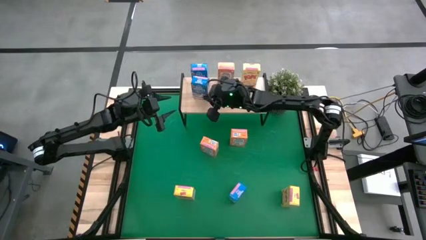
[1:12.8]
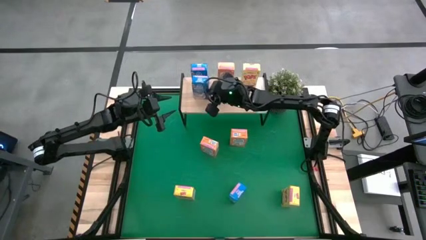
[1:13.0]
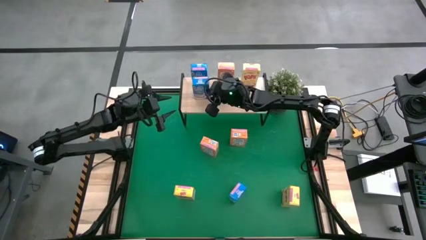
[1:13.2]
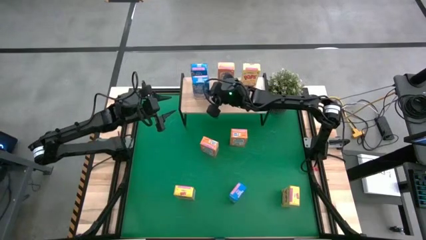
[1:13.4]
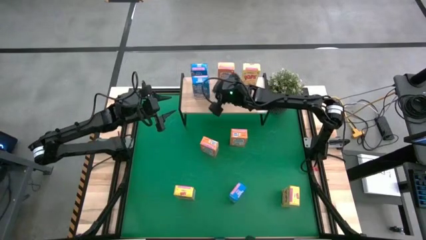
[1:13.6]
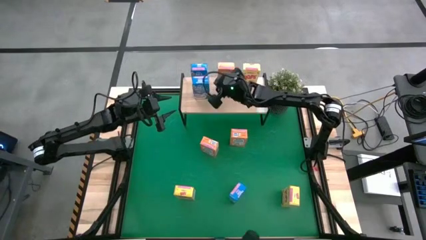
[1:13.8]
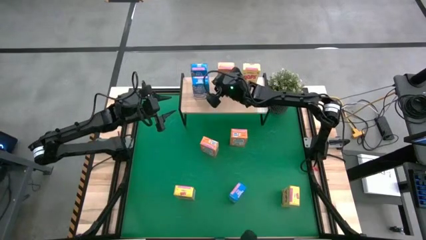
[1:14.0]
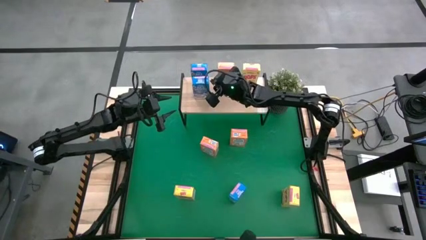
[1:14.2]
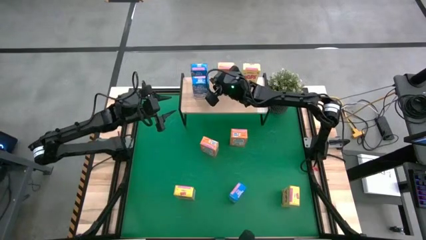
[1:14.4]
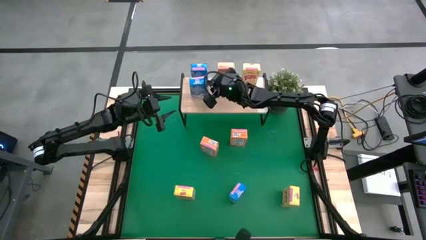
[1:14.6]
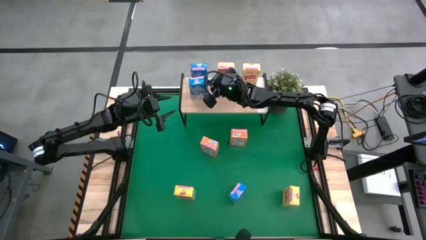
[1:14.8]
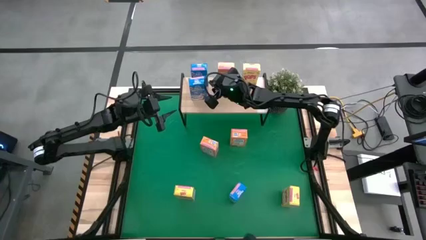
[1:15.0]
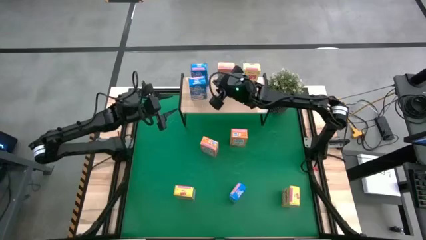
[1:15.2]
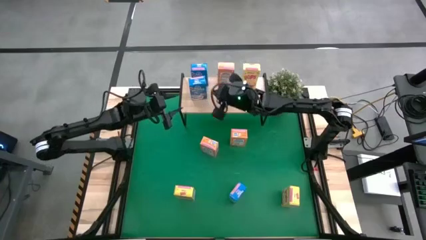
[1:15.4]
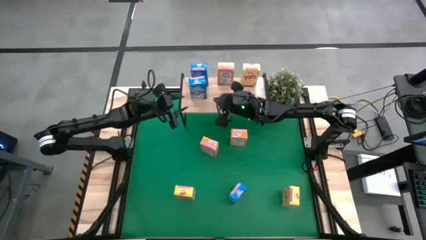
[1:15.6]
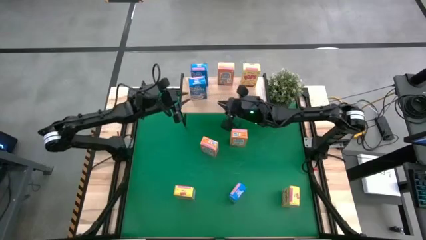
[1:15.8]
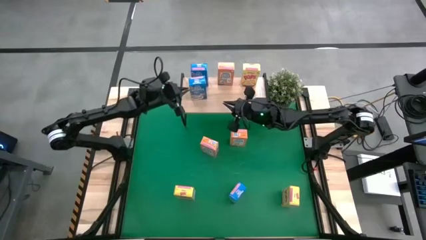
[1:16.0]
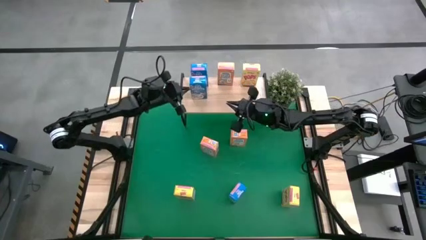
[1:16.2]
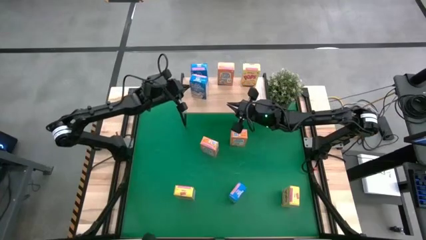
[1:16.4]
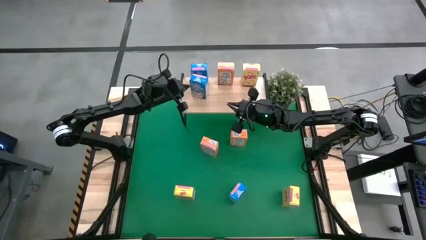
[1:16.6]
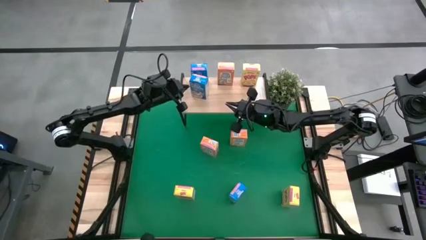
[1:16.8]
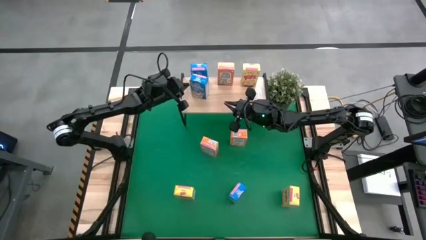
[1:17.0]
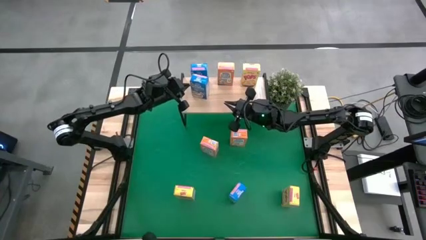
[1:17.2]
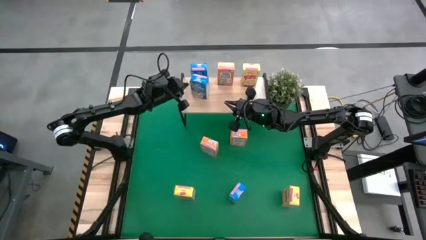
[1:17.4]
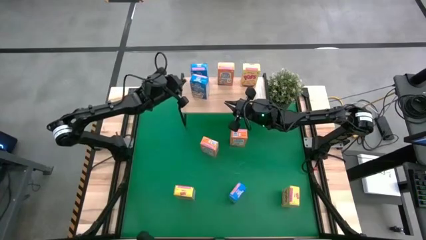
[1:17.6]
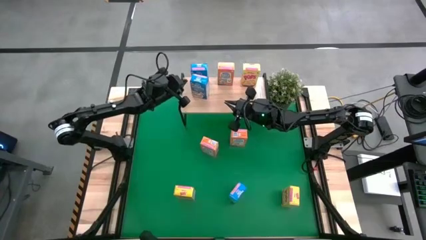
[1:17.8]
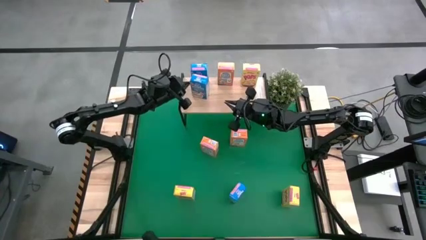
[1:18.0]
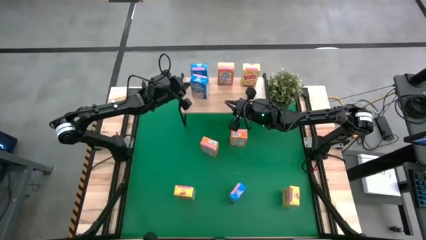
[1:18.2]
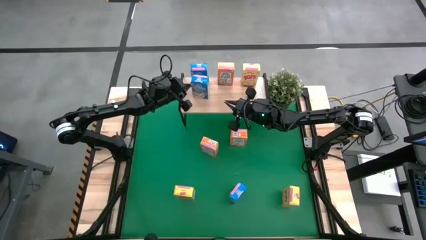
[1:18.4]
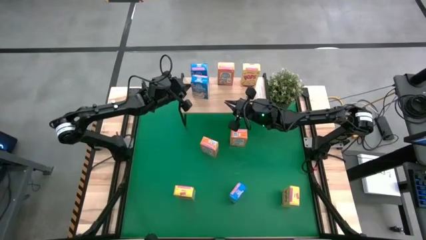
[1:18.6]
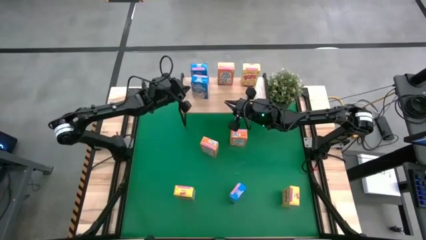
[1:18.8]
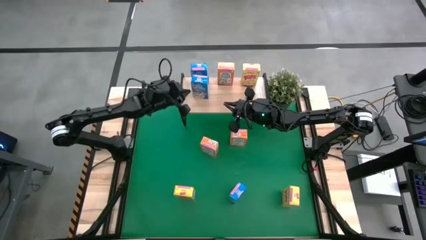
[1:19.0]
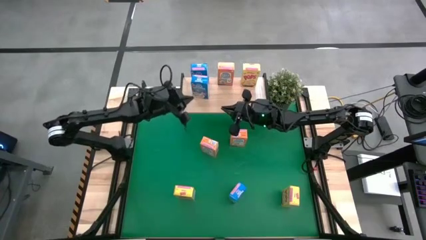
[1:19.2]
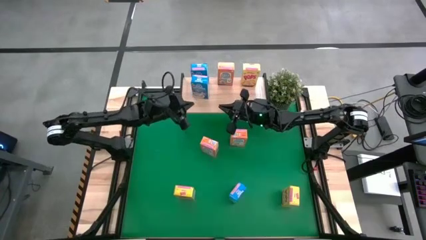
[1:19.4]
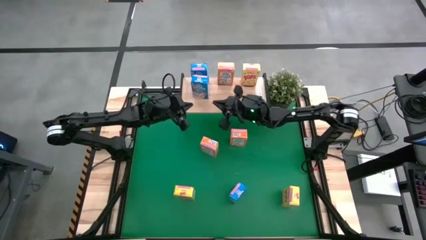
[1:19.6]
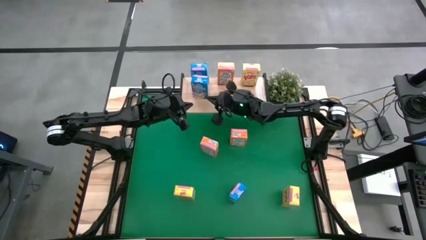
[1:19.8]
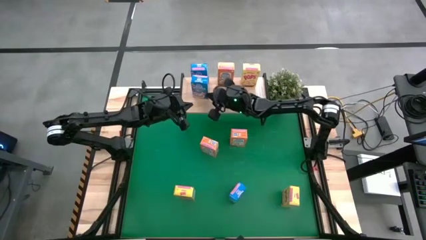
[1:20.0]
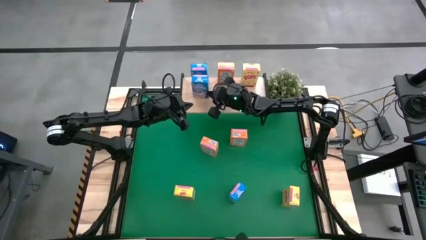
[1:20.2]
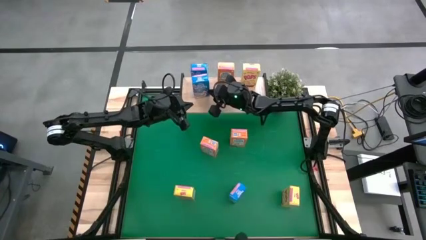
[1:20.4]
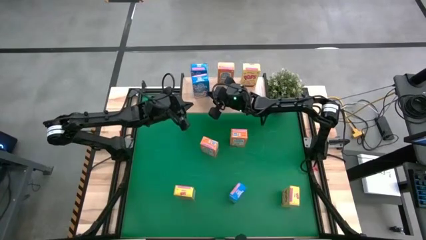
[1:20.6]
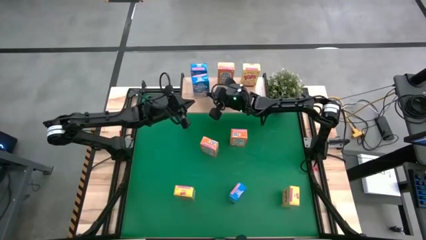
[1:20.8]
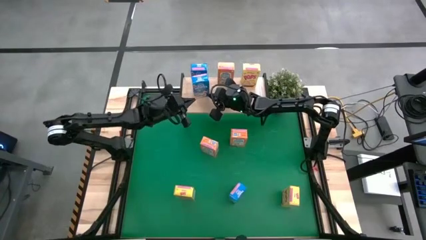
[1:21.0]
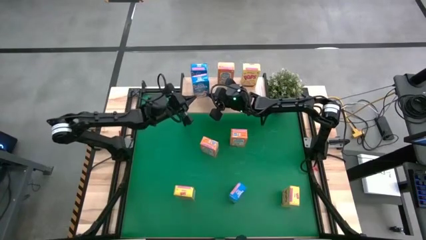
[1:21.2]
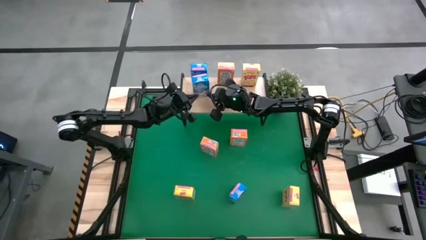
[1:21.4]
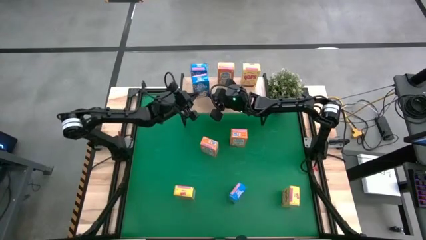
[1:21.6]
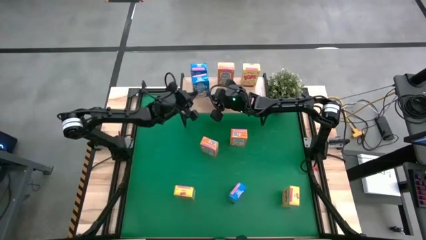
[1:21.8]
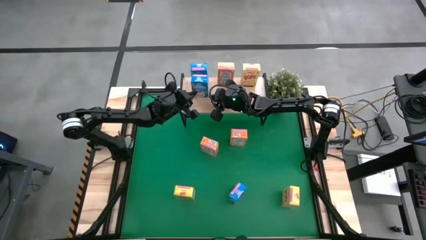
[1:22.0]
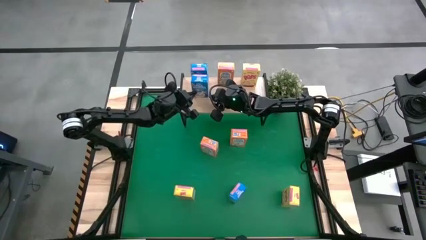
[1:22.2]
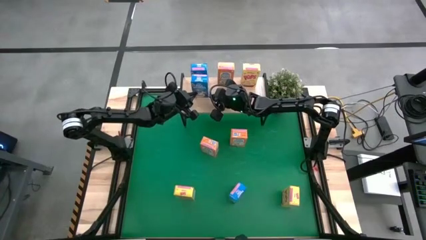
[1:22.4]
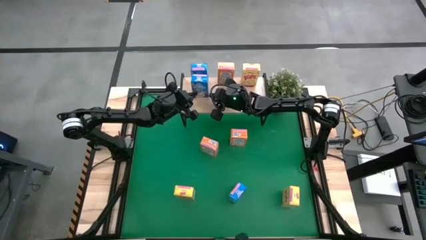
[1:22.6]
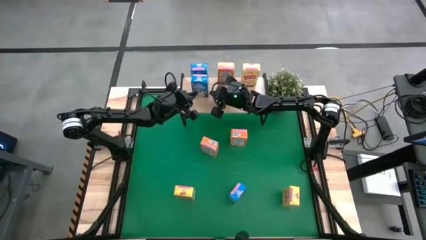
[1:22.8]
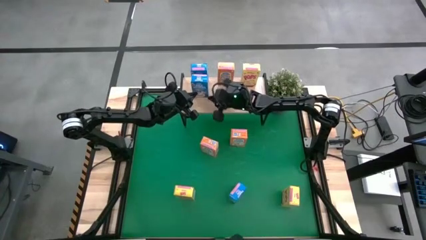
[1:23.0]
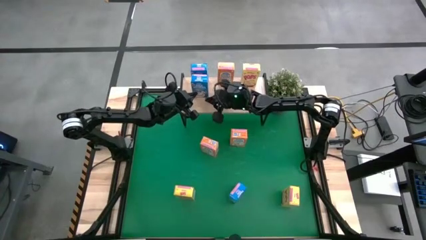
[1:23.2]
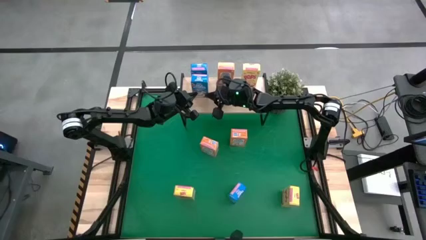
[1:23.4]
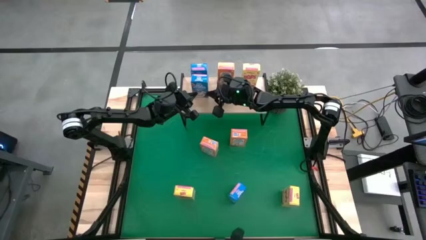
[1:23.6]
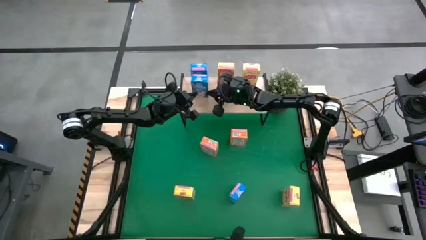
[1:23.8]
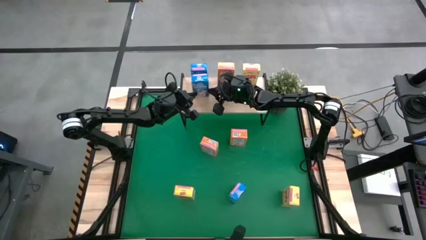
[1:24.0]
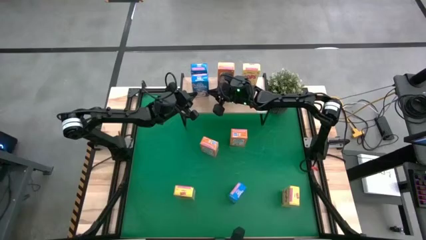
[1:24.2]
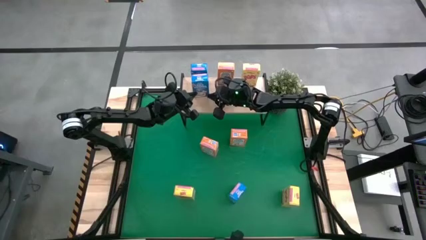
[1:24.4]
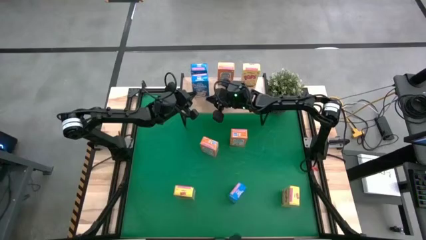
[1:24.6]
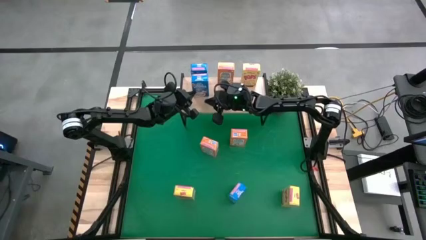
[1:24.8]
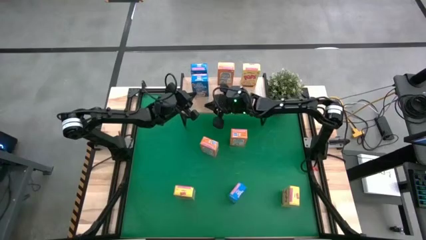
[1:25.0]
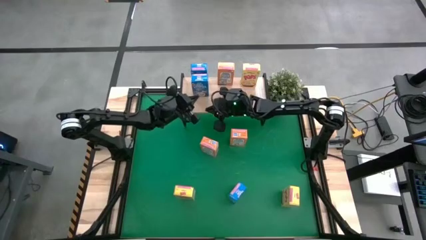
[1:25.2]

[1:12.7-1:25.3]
Task: Stack cereal on shelf
Put the top blue cereal box on the shelf

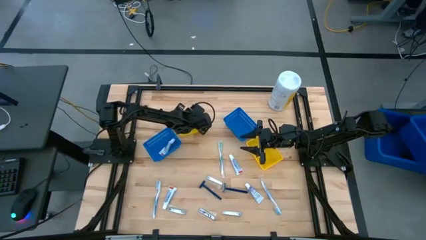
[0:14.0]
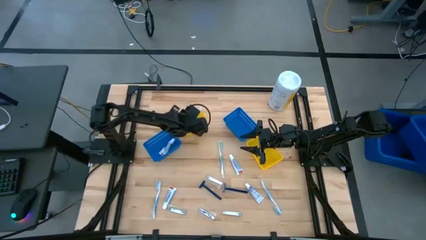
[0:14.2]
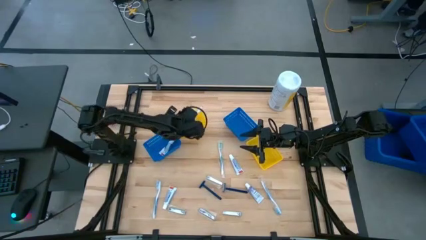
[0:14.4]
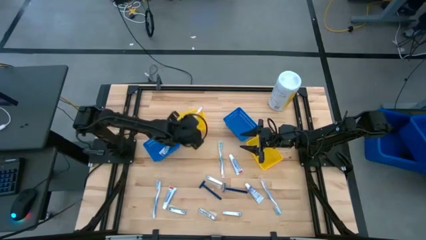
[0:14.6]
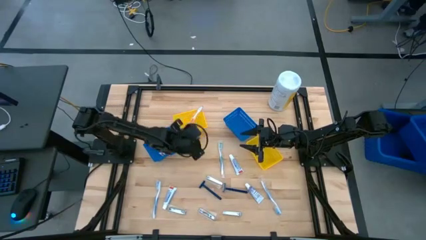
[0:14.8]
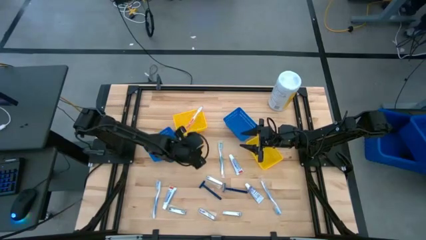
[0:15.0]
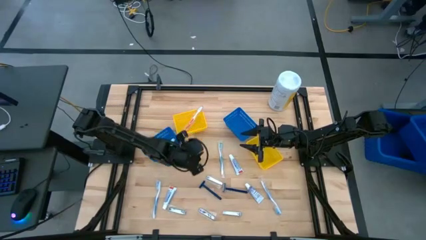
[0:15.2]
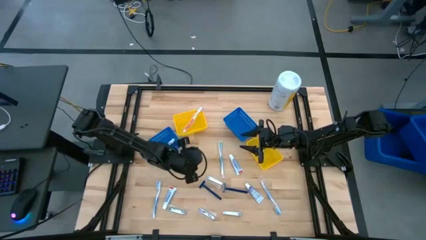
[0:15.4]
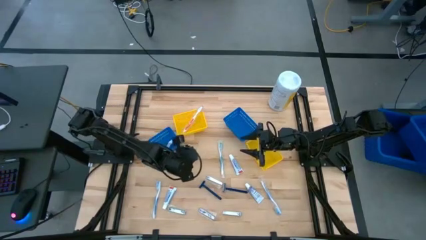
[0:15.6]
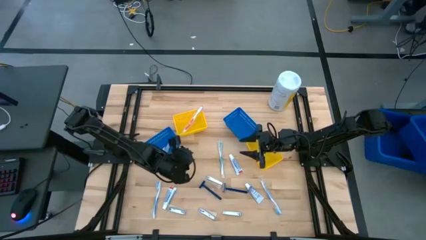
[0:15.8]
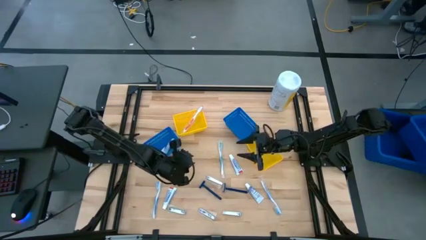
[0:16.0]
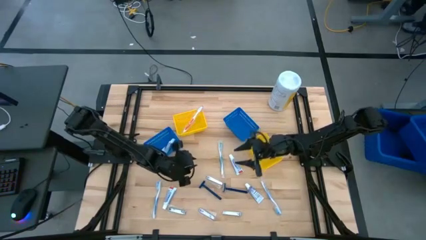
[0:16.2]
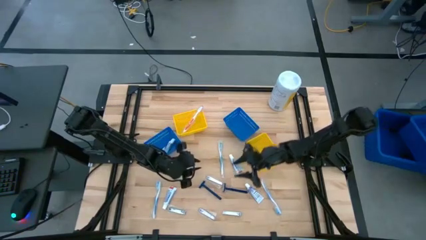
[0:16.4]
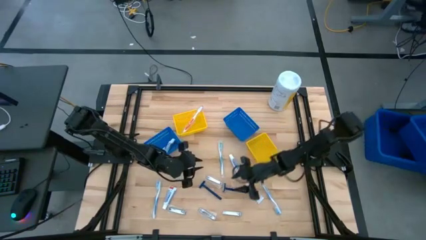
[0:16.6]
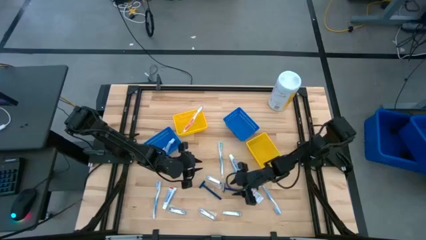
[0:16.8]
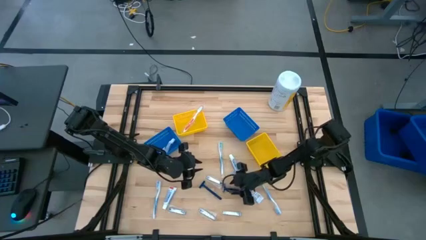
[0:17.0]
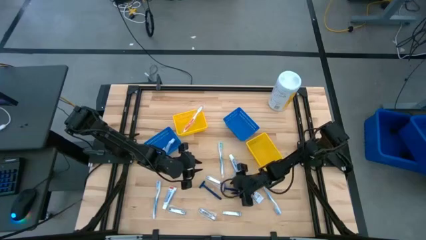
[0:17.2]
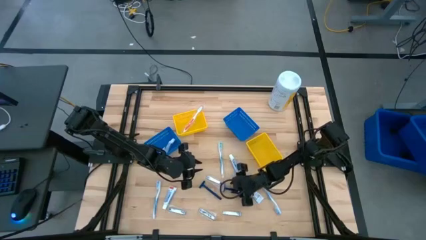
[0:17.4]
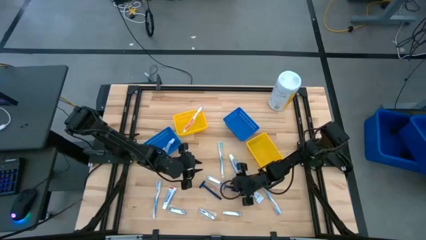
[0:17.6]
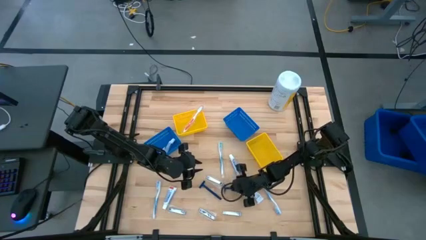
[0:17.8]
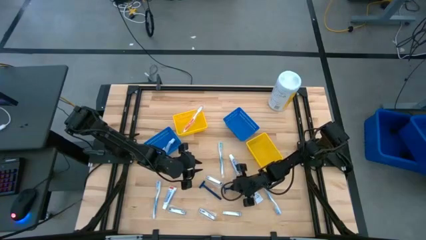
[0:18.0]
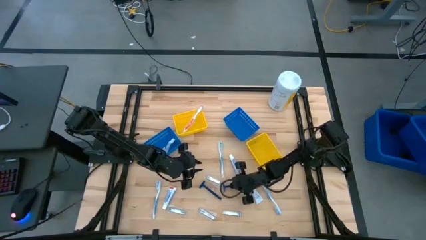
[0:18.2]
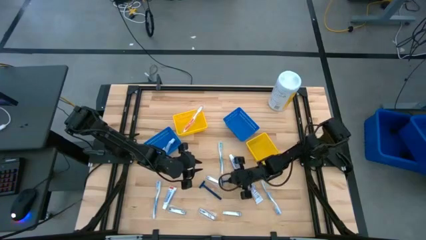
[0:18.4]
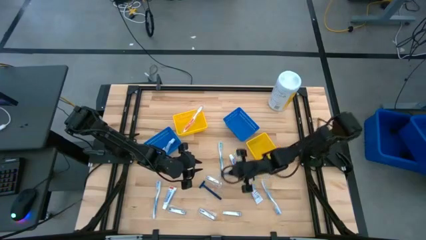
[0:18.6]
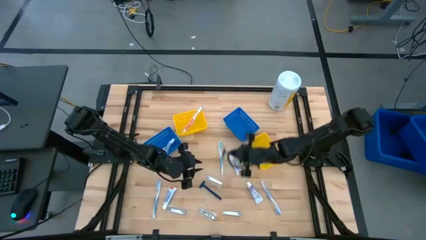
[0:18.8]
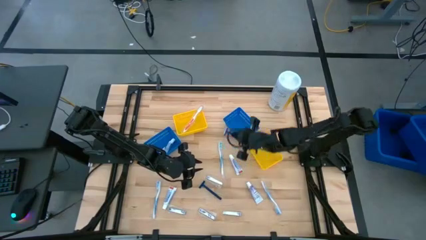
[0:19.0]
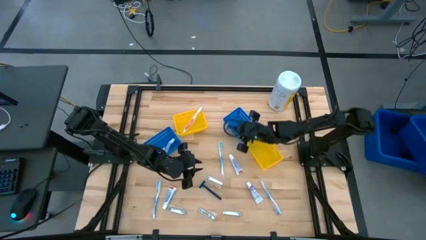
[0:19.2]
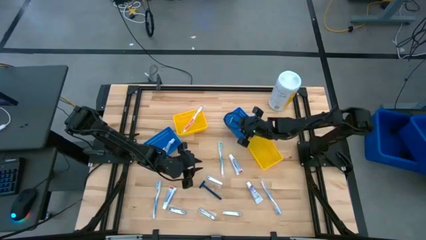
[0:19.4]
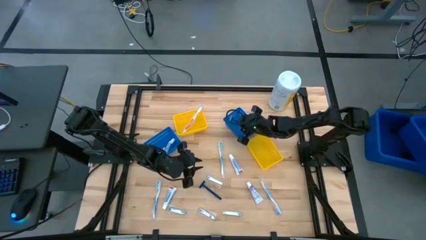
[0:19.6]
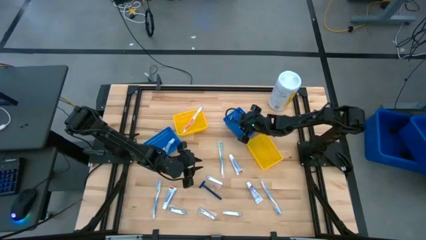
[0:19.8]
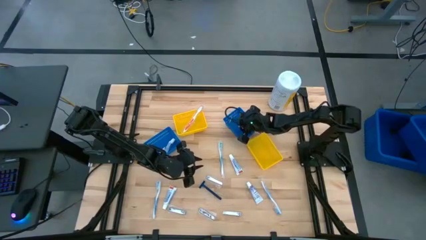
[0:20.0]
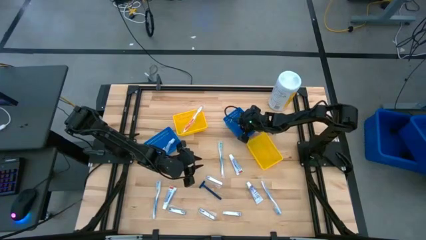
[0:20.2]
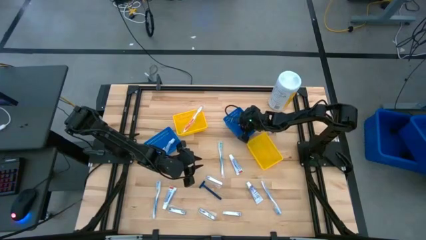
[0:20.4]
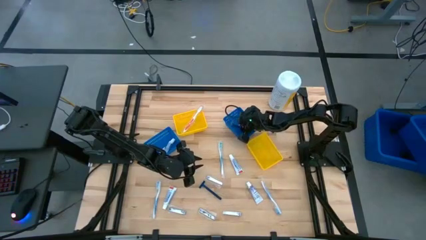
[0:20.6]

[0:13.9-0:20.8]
Task: Pick & Place Travel size toiletries
Put the razor into the right blue bin
